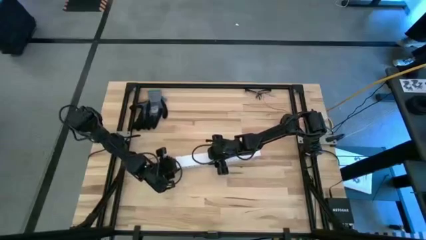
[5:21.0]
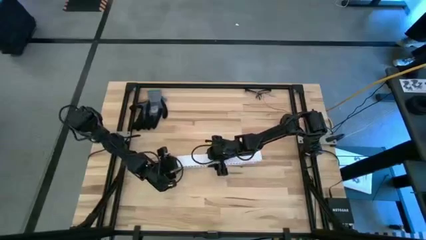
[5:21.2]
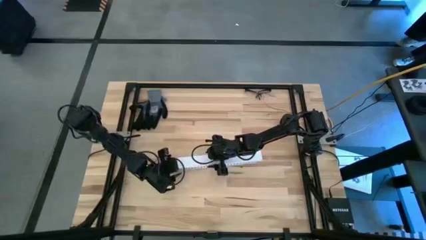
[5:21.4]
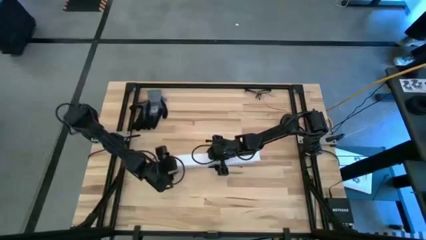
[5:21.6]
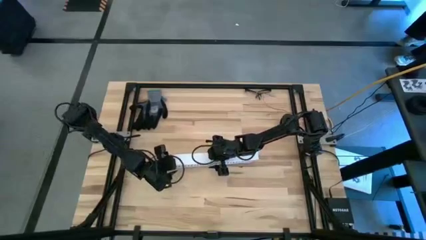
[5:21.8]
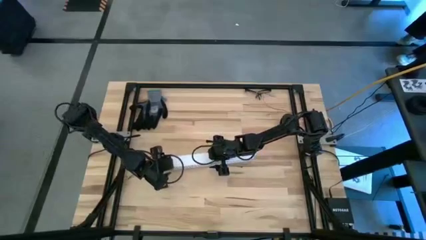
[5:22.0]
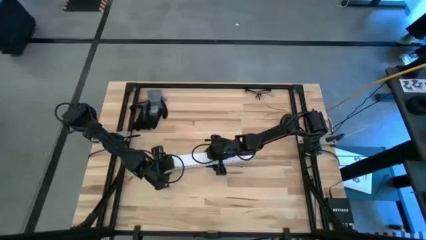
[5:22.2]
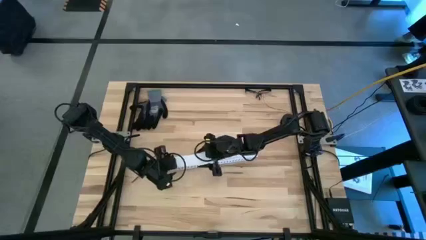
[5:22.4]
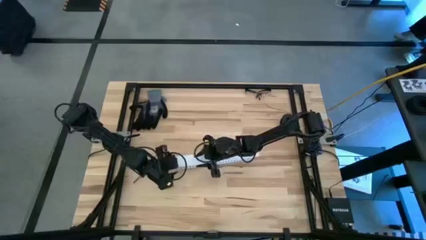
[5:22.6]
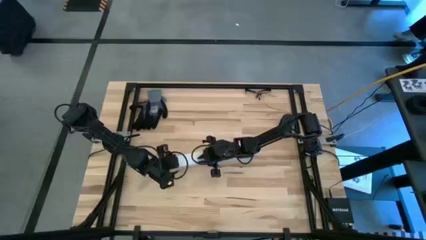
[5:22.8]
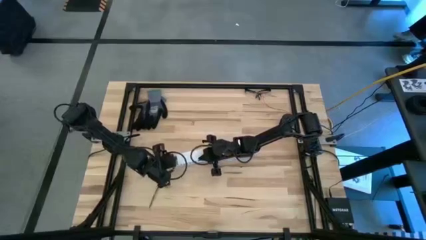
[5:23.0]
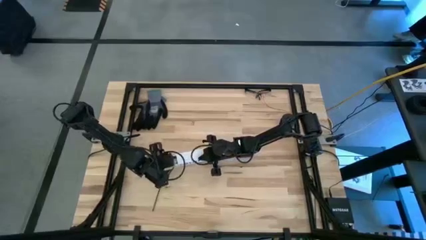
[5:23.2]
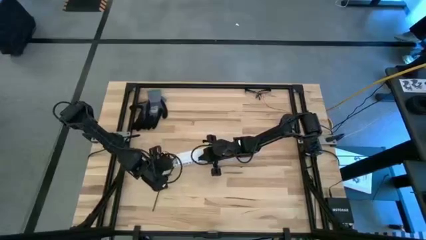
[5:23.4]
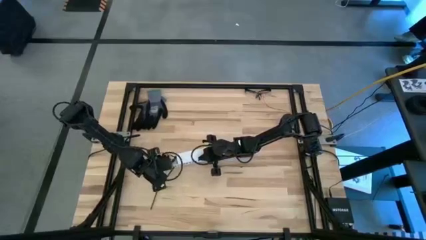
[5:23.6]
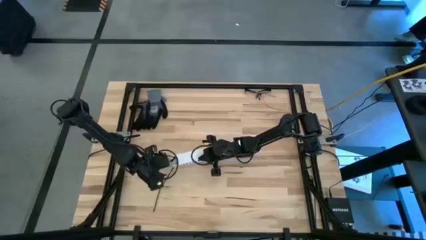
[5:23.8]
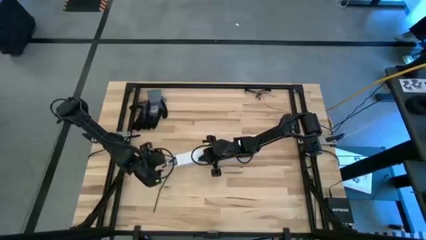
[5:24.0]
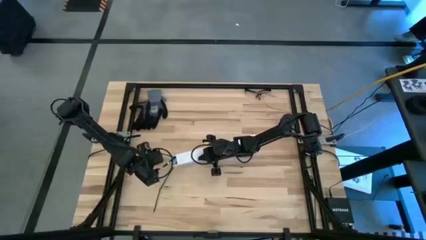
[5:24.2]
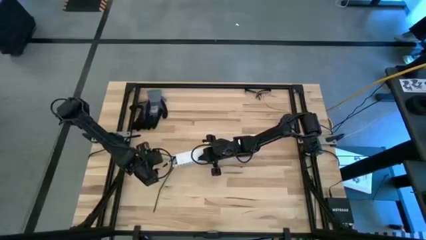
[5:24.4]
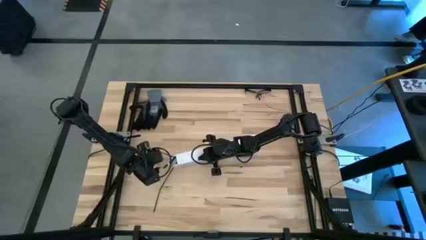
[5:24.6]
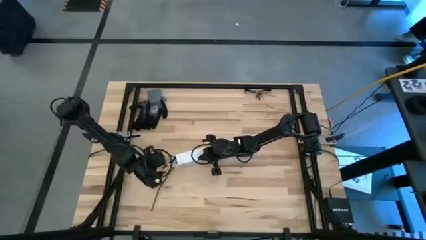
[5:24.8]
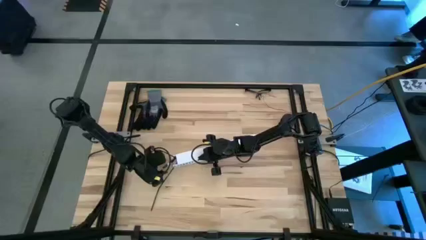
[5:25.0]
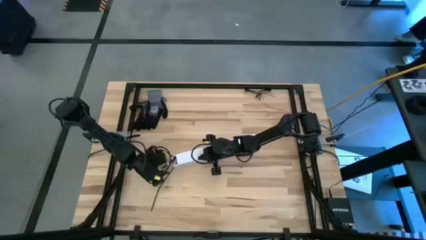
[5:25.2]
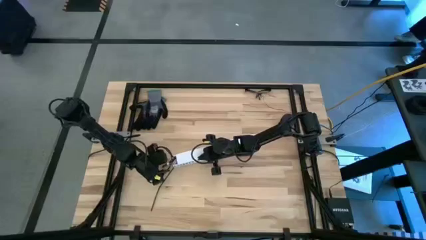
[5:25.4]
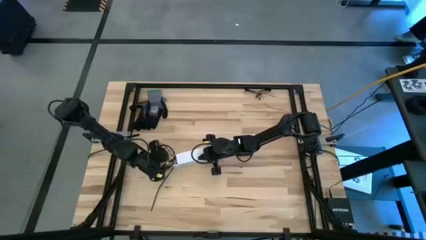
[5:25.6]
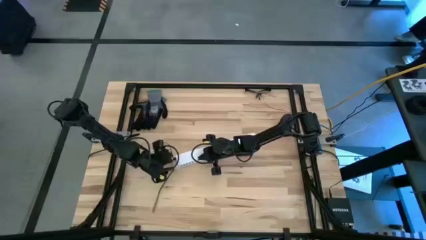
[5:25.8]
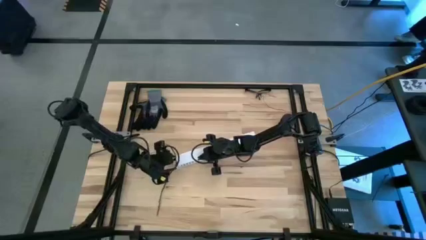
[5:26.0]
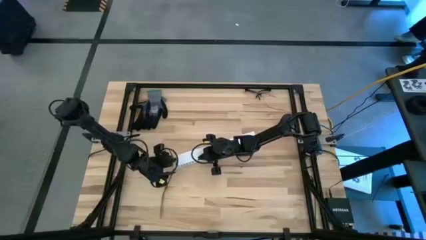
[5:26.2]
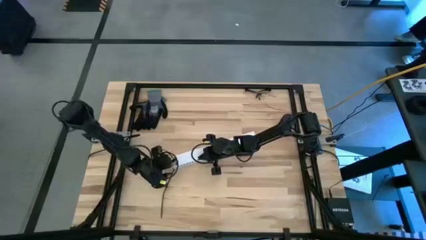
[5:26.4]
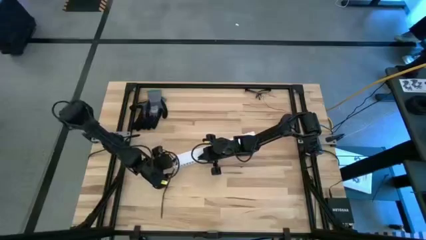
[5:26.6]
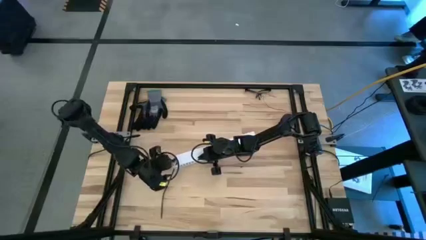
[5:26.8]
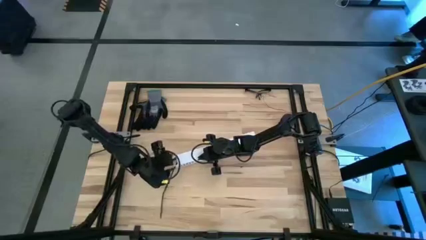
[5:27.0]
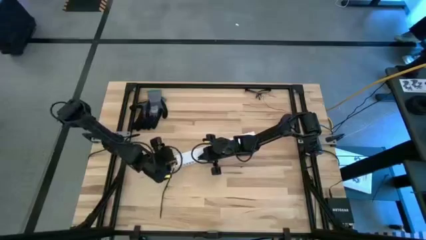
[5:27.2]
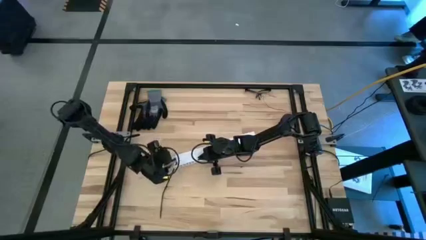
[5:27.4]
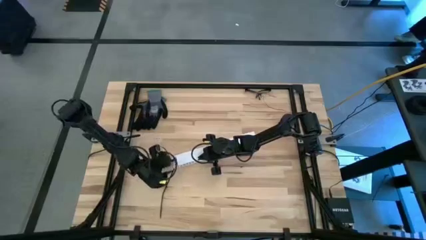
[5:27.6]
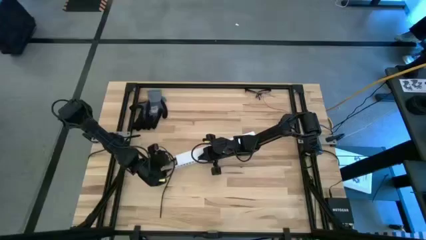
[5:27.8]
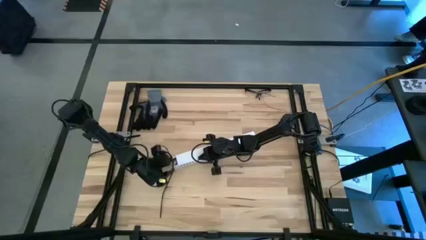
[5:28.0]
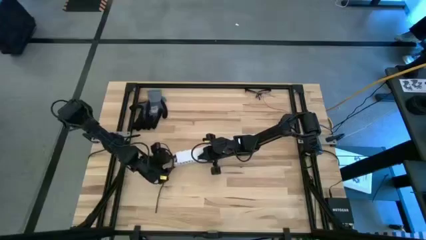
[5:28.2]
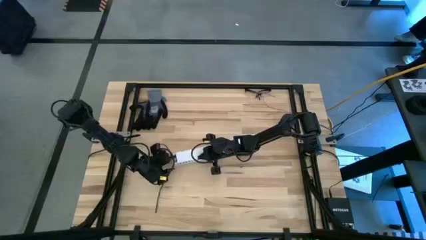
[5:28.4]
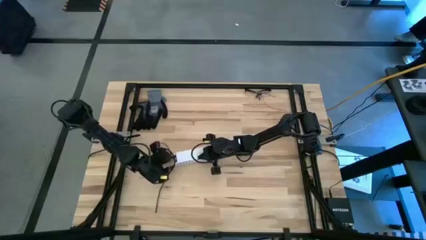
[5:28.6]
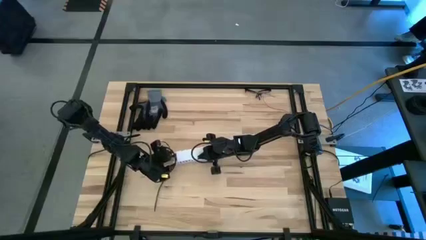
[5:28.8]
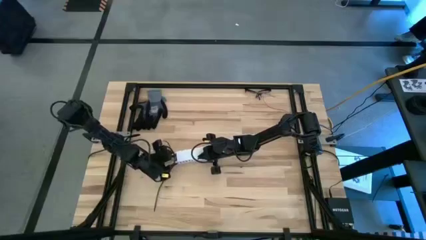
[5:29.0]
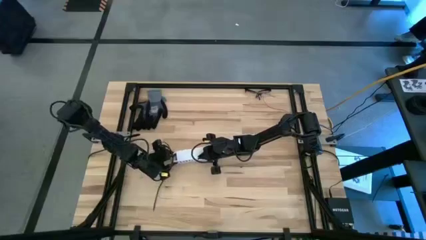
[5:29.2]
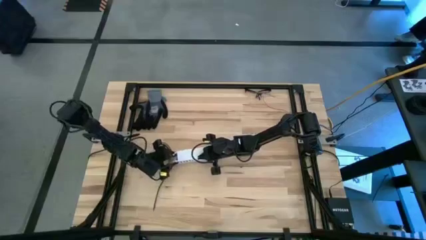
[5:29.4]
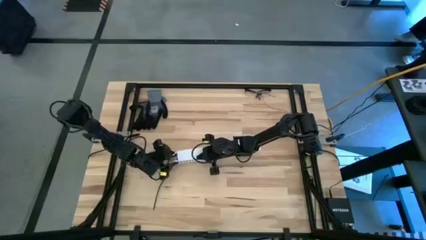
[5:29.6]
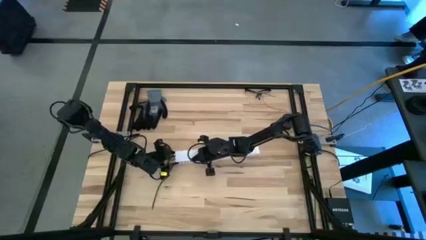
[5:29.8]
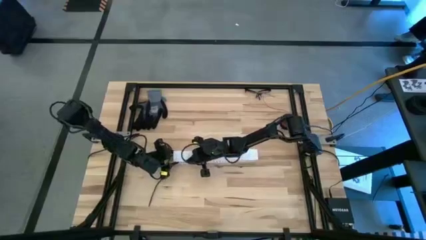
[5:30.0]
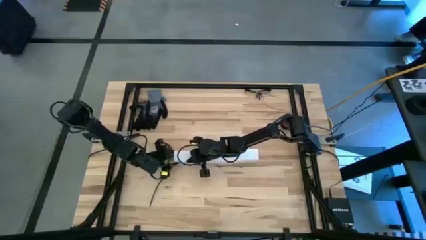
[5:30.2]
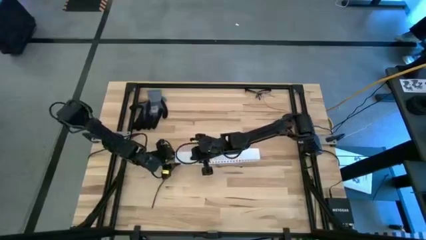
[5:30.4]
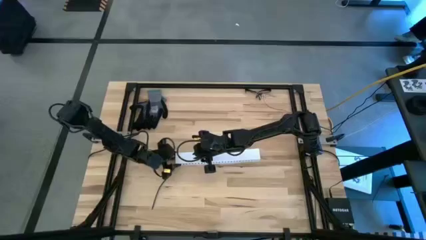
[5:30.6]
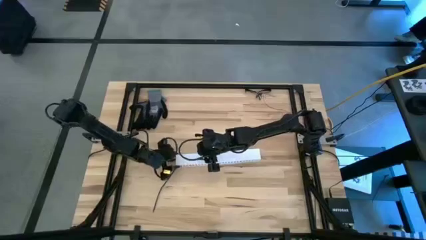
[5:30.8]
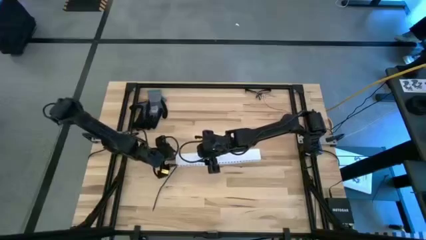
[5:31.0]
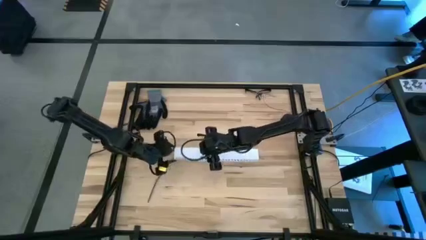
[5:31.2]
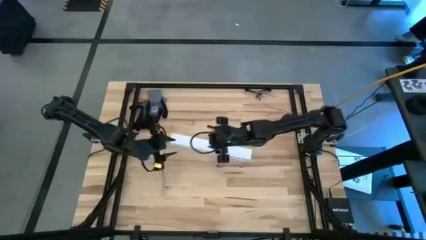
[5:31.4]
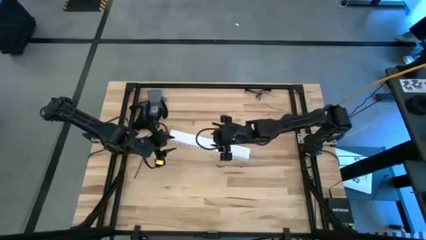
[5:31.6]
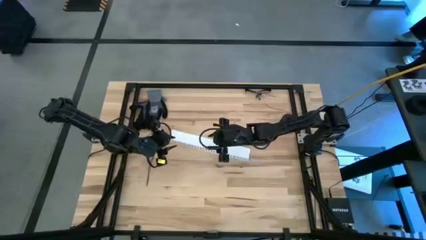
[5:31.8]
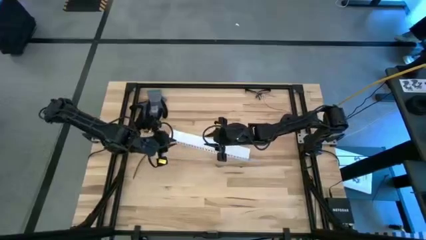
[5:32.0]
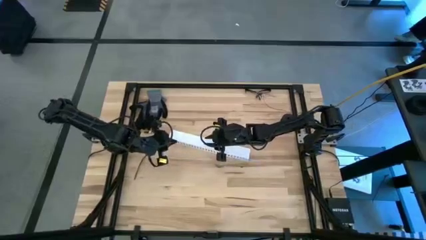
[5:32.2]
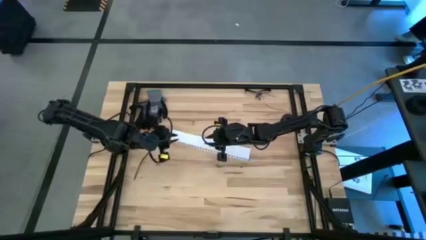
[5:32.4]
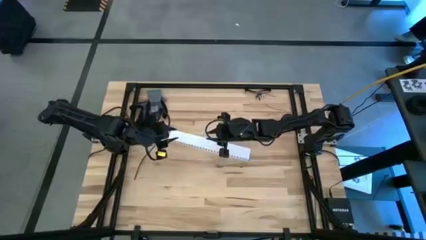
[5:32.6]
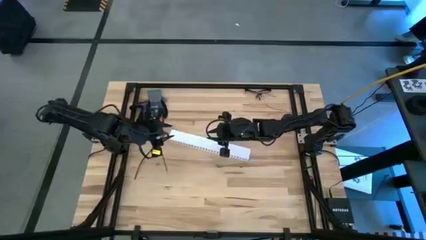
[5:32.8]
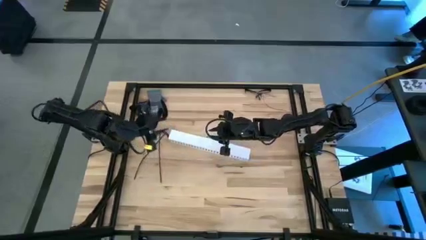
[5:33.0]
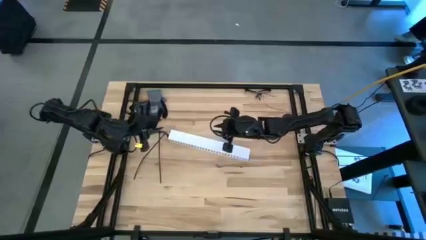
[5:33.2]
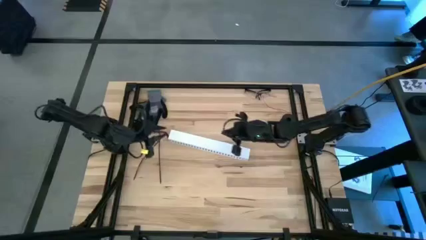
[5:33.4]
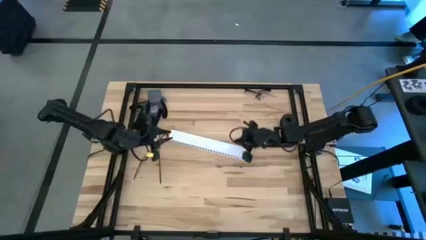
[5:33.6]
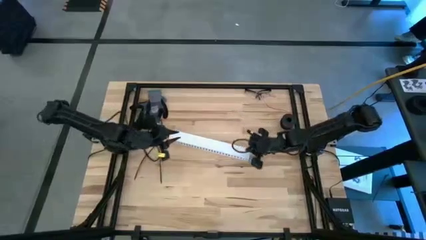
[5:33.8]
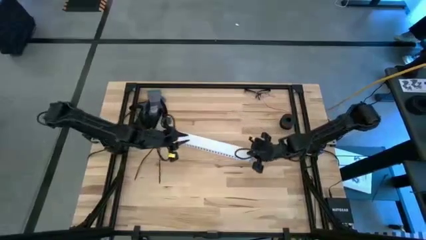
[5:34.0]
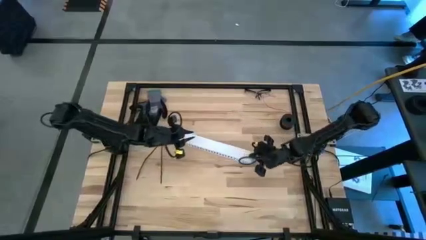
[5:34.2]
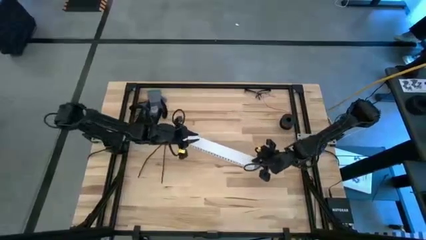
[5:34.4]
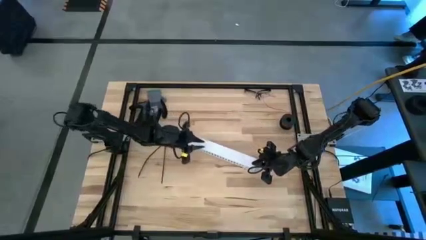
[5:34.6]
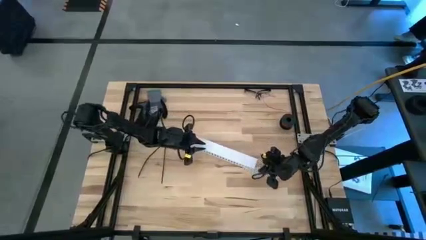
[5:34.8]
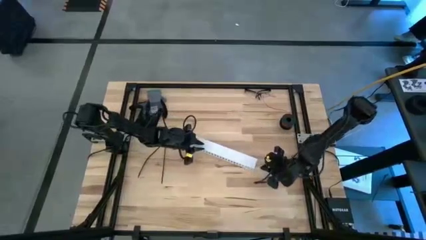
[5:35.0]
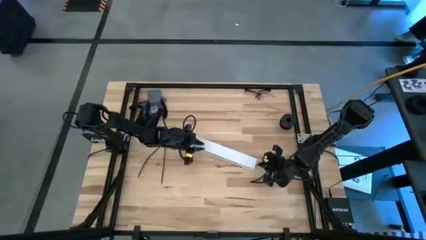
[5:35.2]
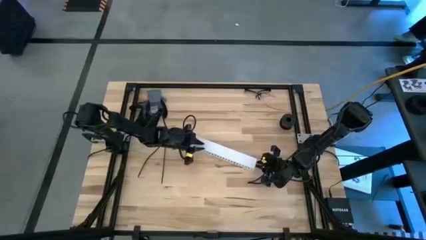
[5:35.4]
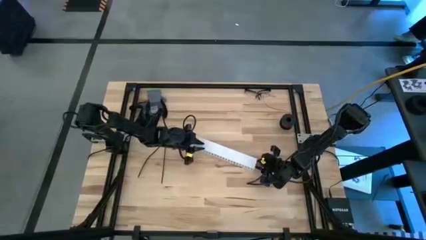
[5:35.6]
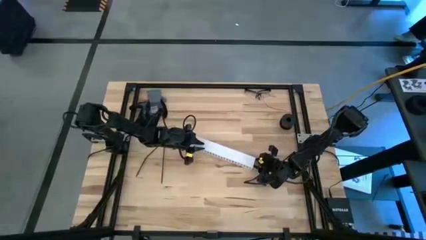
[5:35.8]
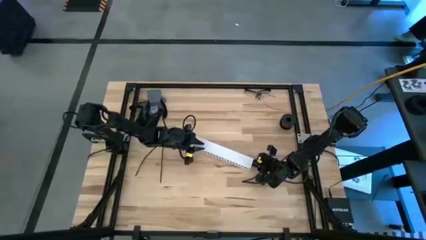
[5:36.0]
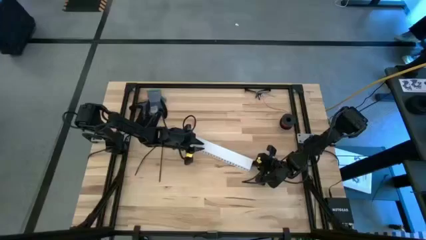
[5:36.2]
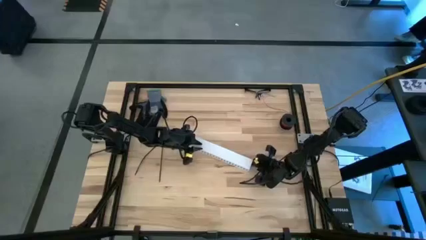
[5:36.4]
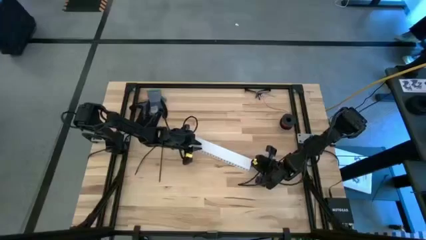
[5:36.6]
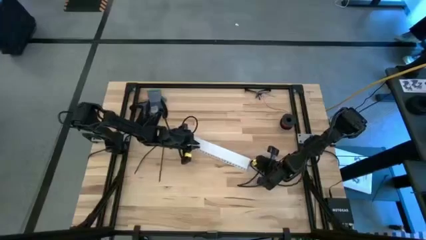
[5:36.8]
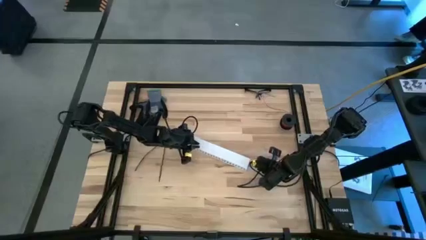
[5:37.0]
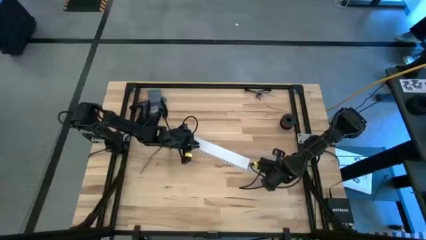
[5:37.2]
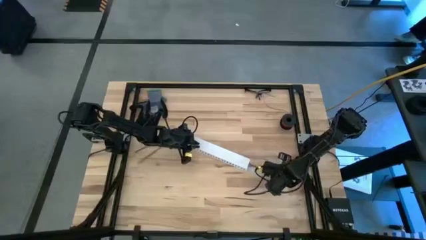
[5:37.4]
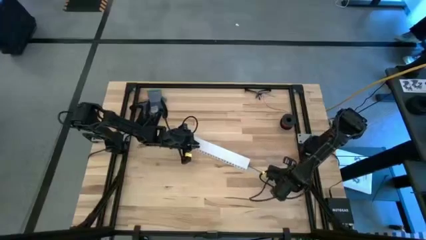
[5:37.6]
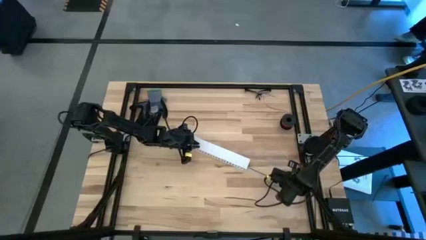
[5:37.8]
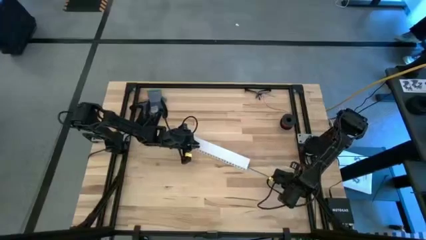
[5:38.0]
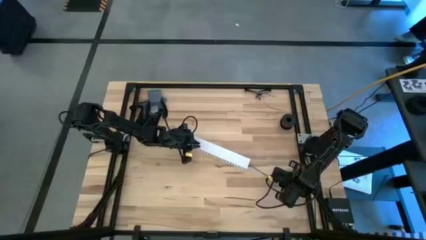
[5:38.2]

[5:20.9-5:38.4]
Task: Ziptie cables
Close the white cable duct
